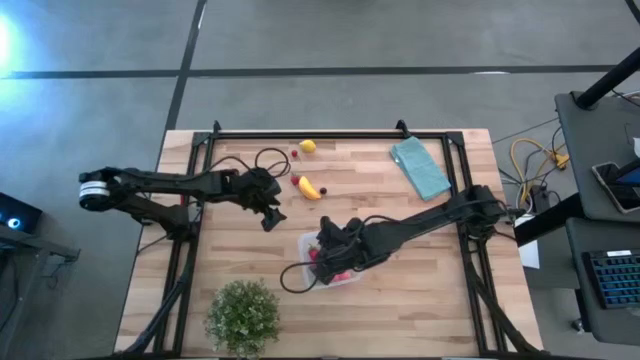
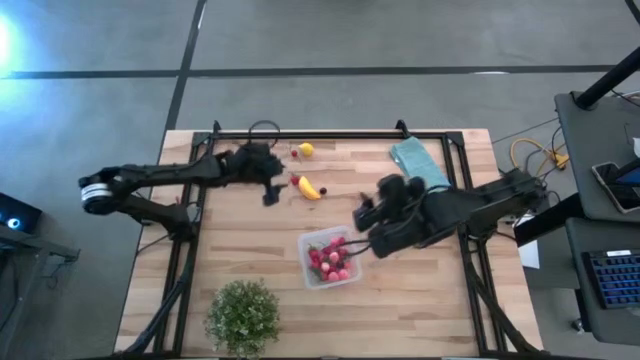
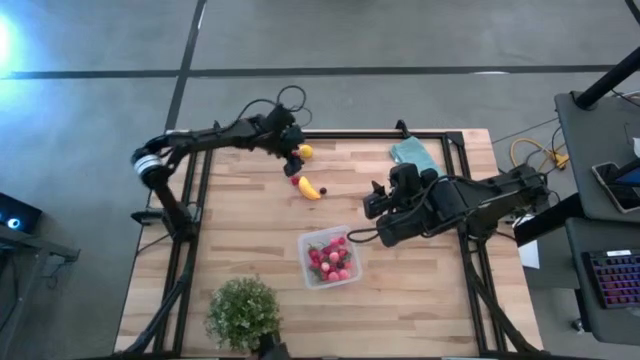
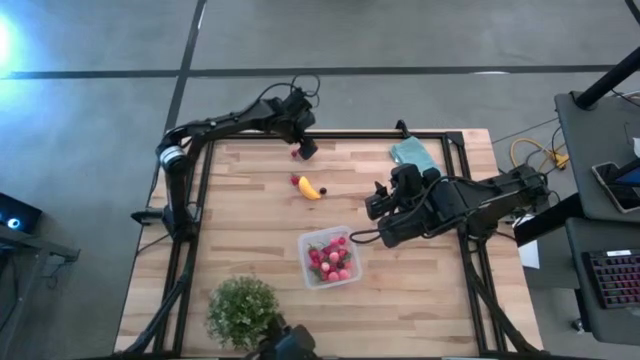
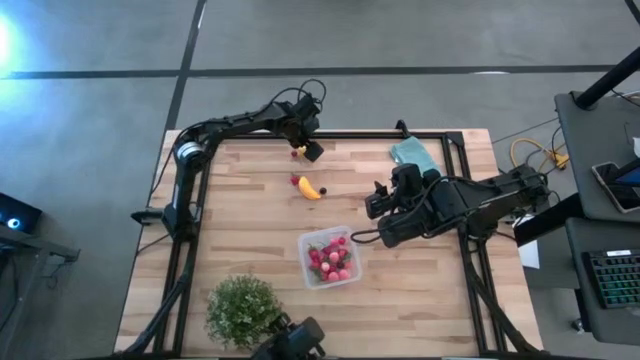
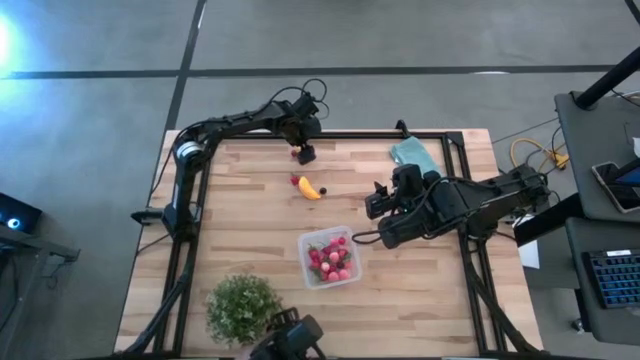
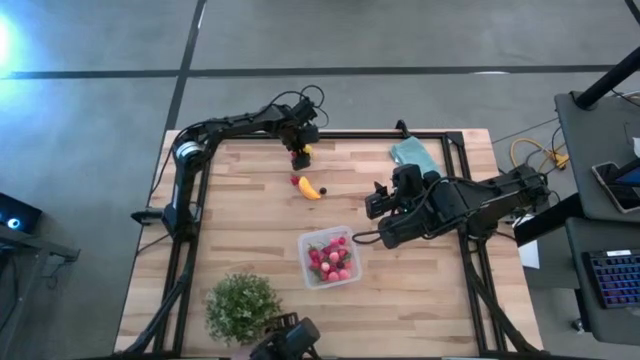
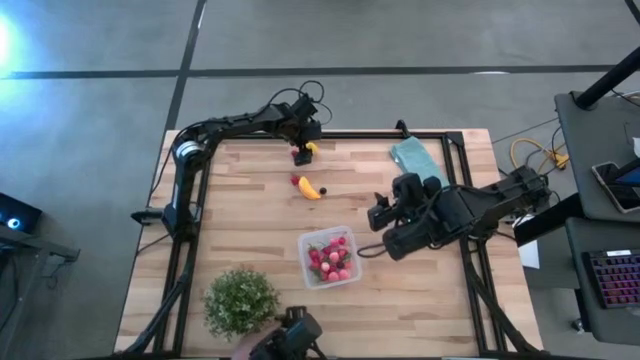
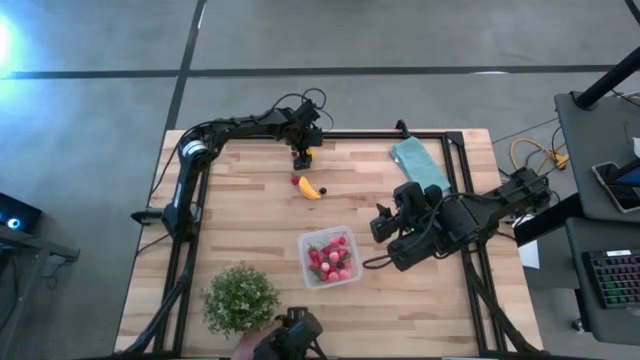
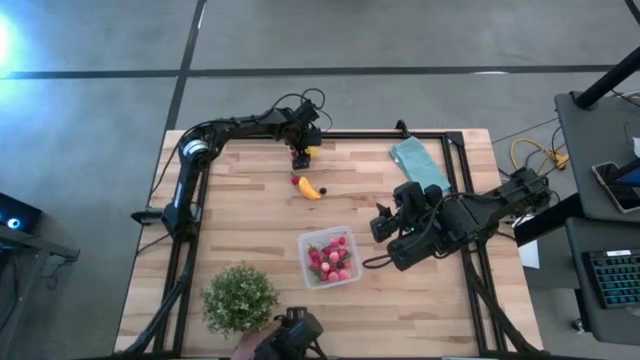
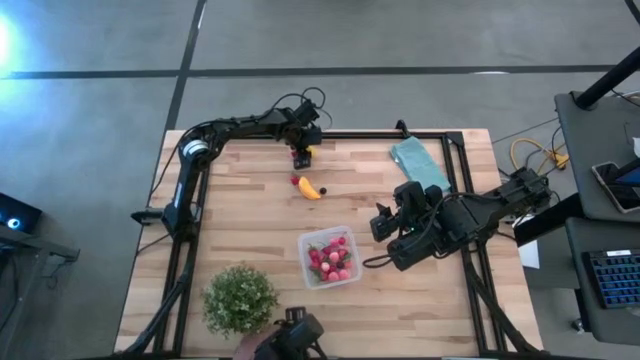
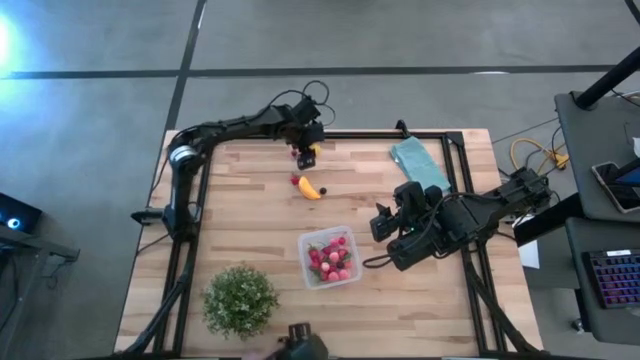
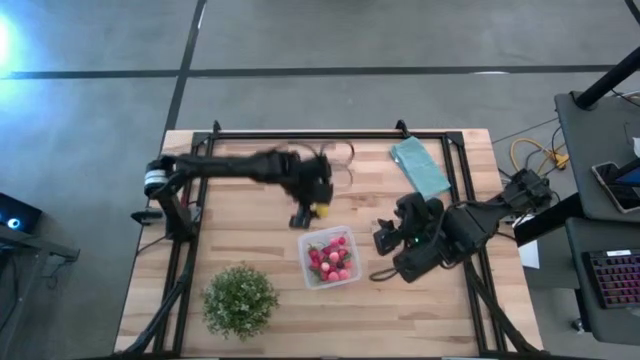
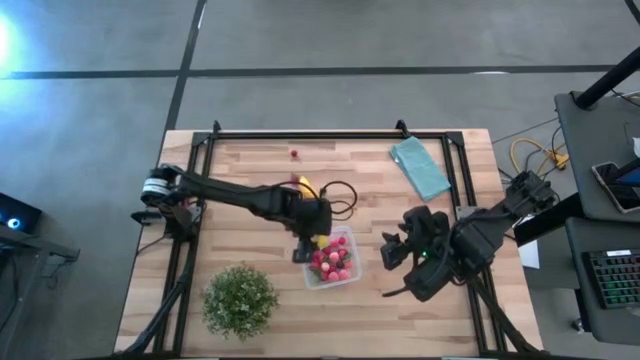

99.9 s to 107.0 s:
Task: Pick and placing Produce into tupperware
Put the lemon into the transparent bin

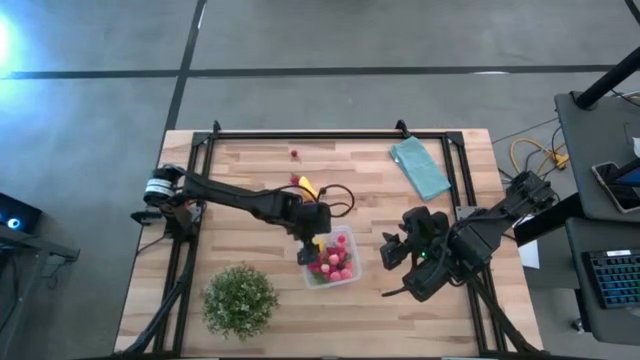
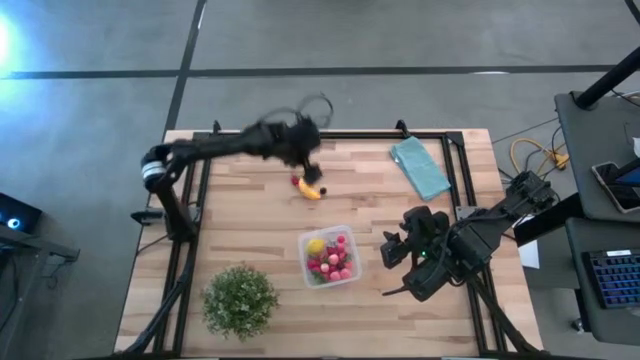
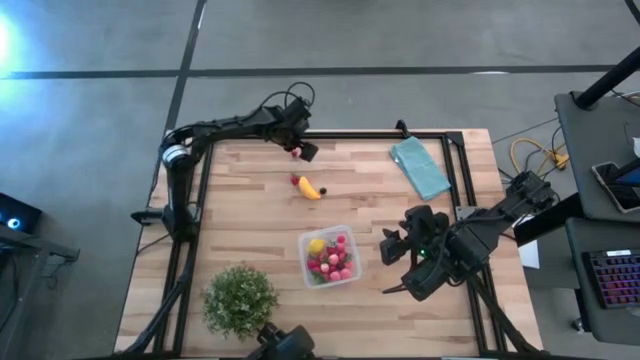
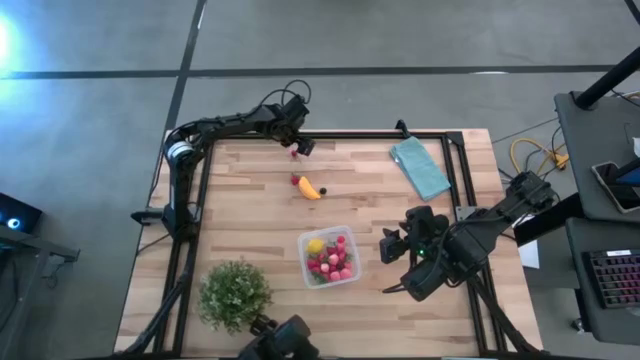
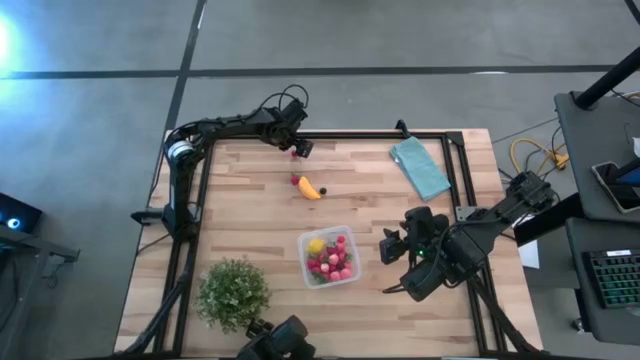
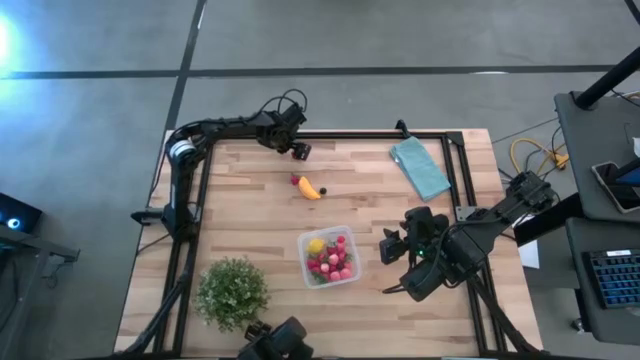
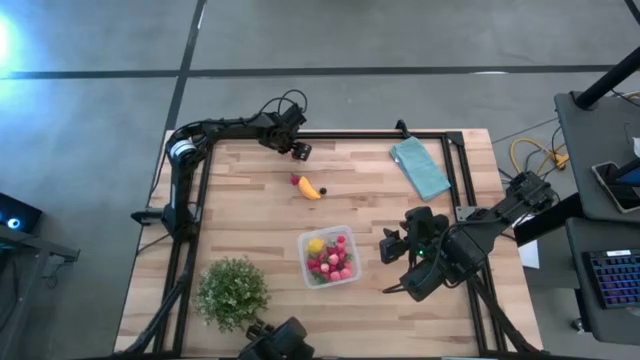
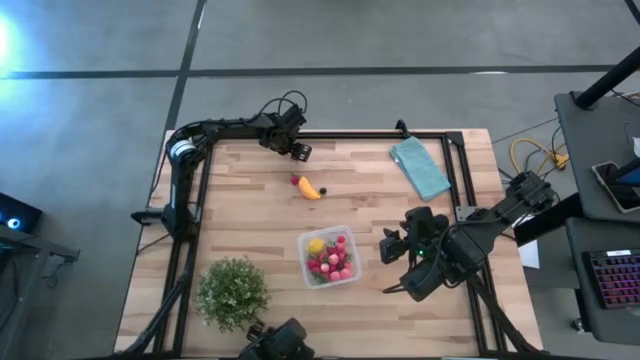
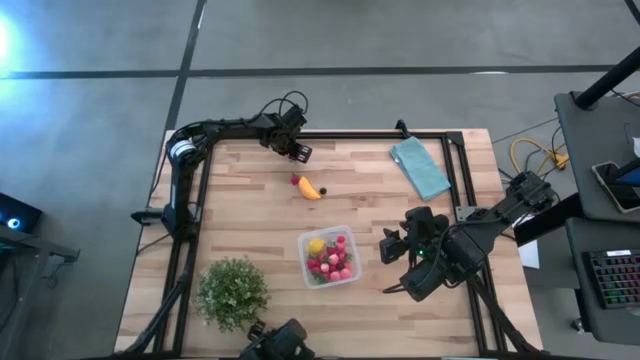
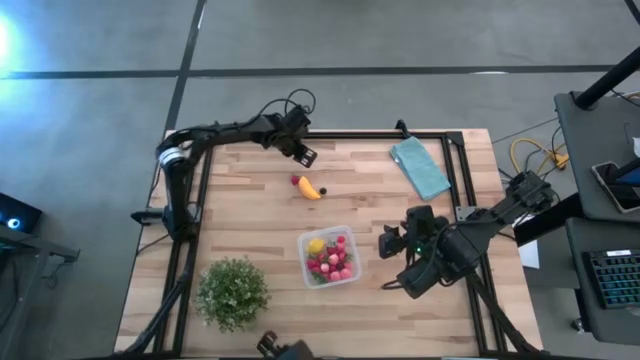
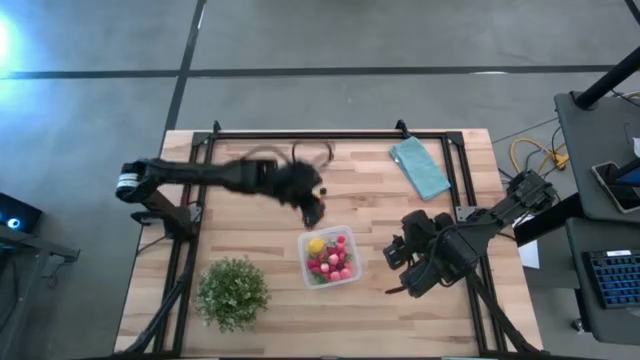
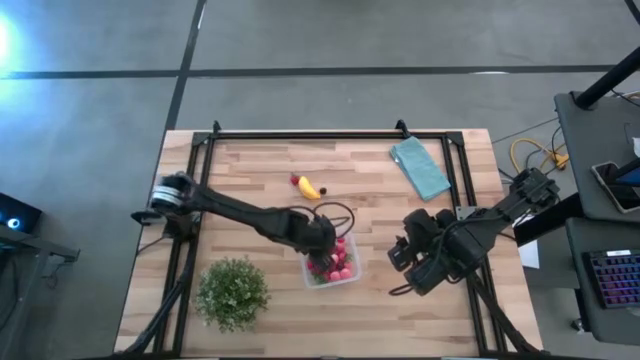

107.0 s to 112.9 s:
Put the red cherry into the transparent bin

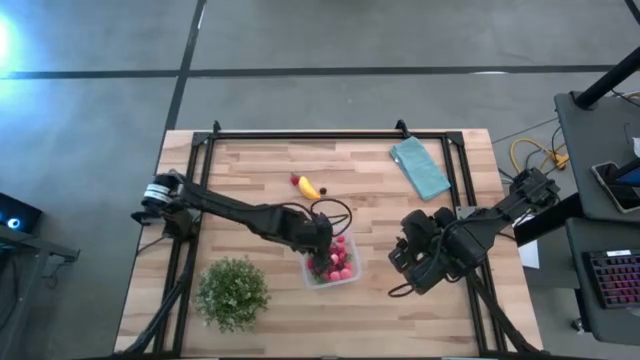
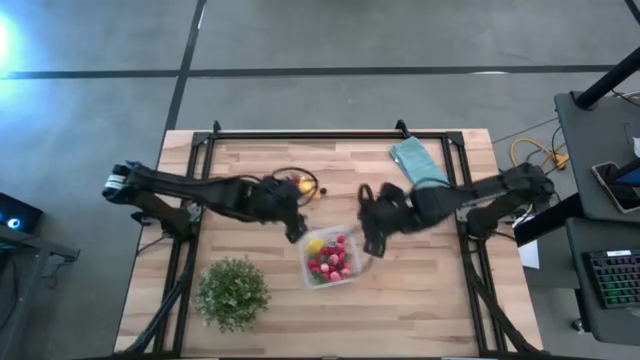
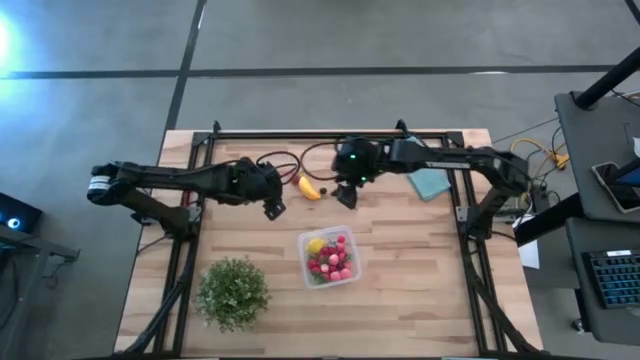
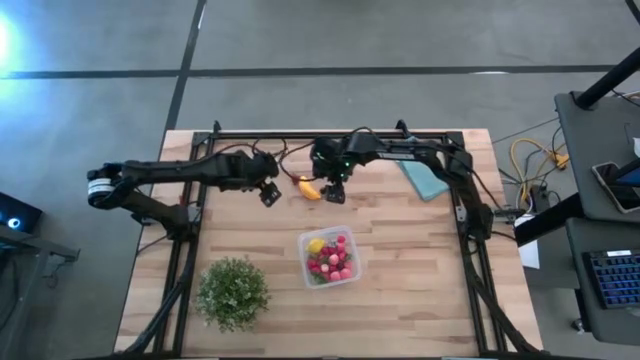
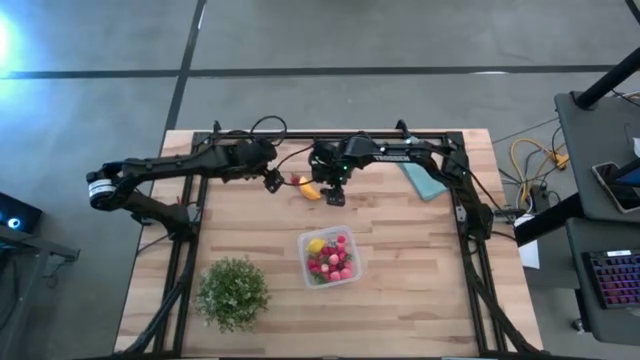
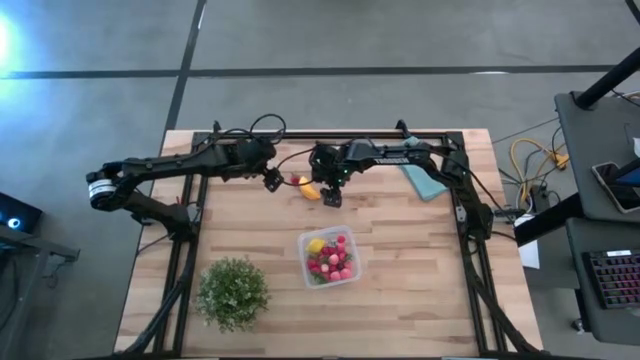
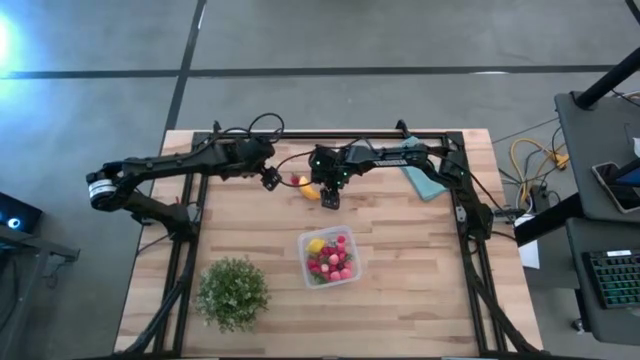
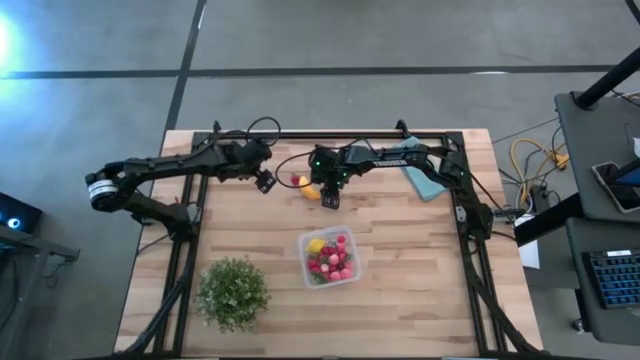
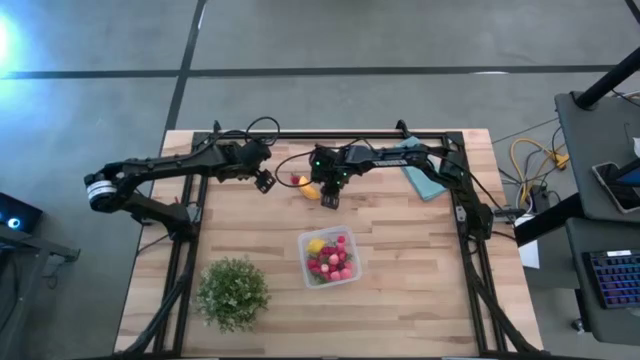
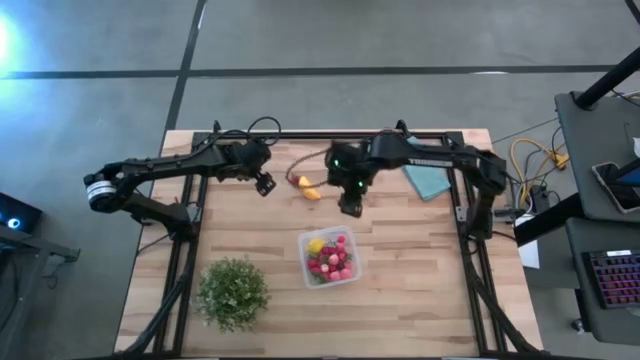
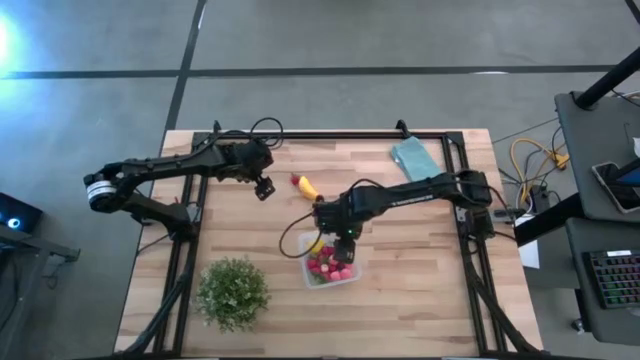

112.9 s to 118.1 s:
Put the plum into the transparent bin

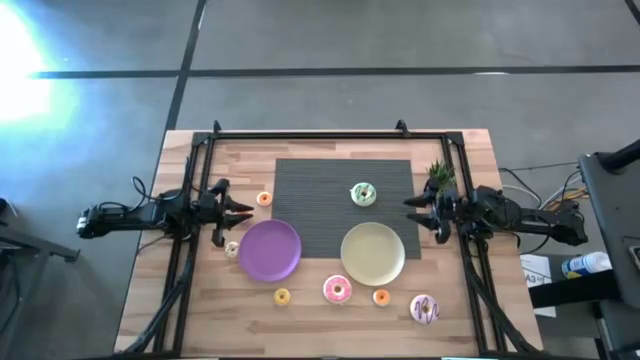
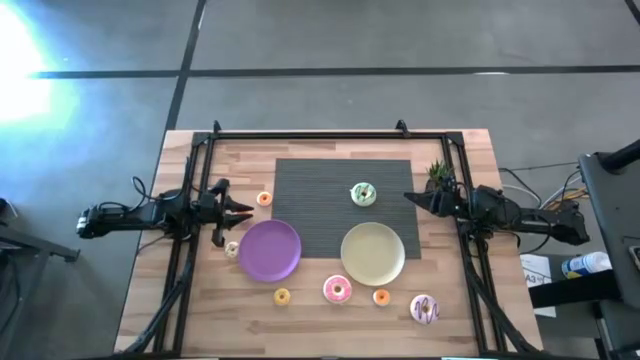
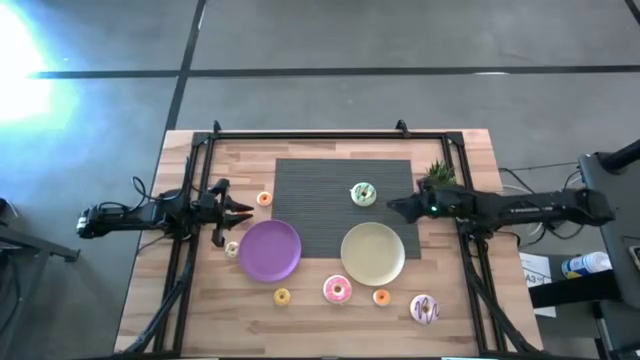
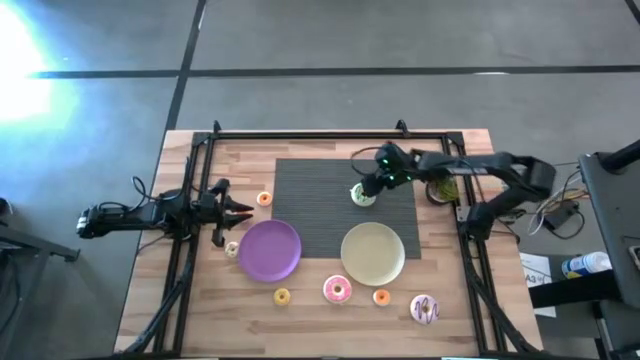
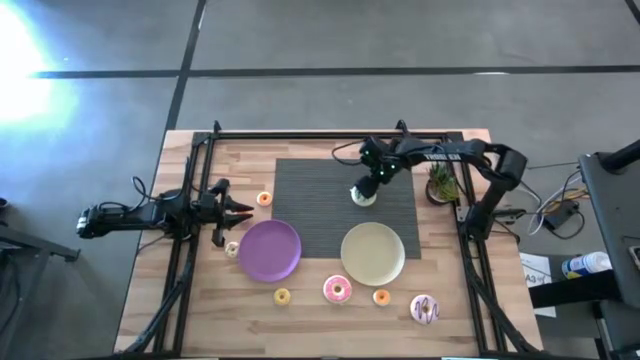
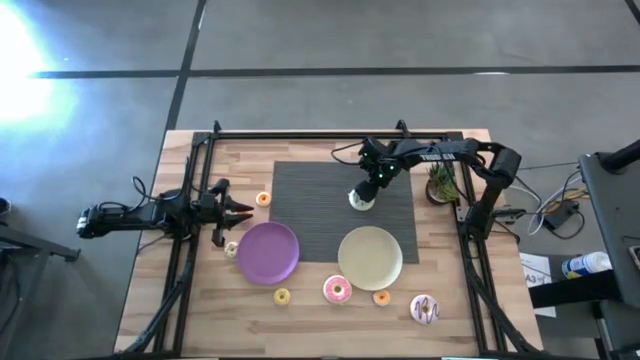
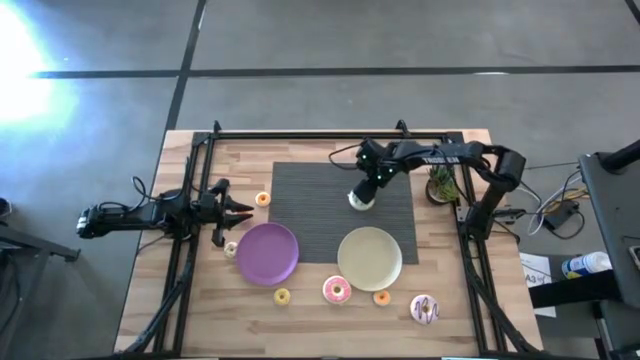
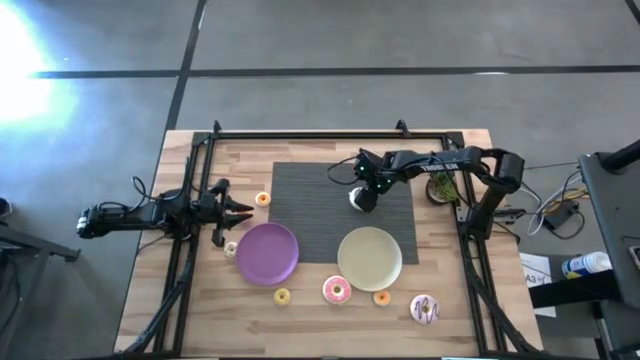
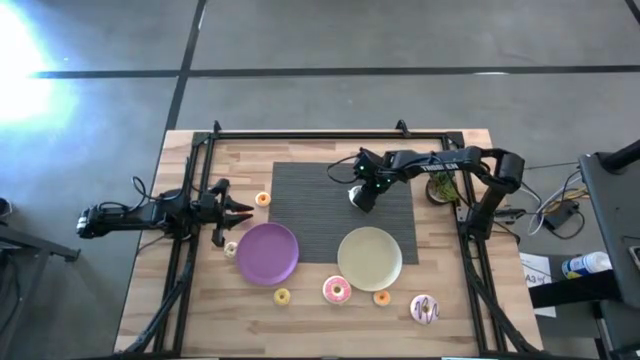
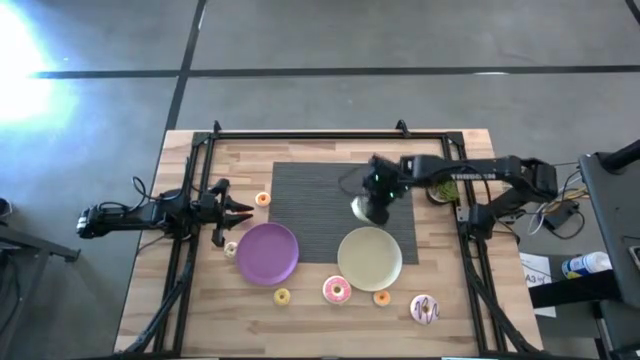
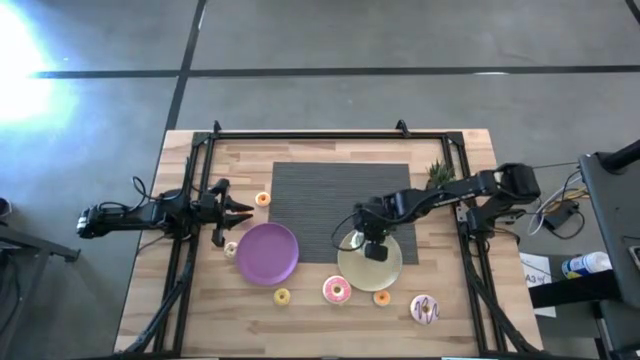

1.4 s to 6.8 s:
Task: Pick & Place donuts
Put the large green donut on the brown plate
